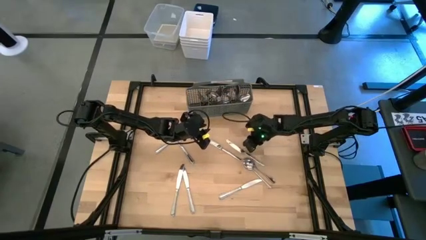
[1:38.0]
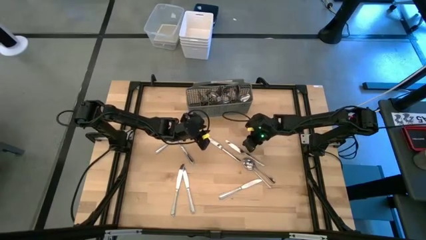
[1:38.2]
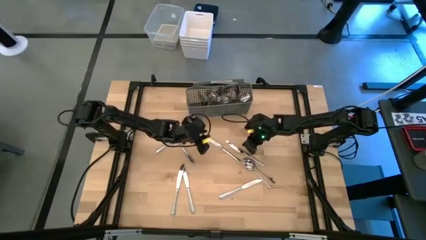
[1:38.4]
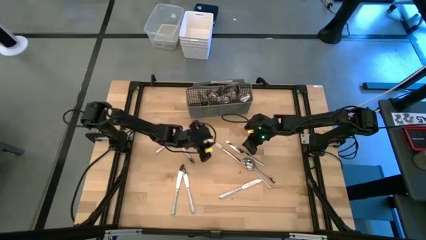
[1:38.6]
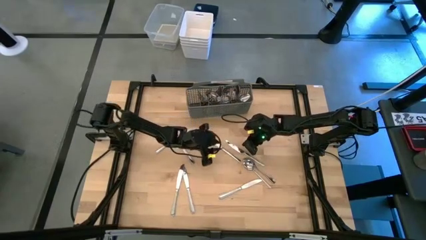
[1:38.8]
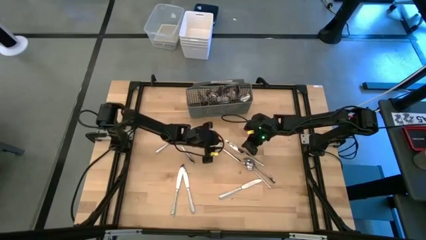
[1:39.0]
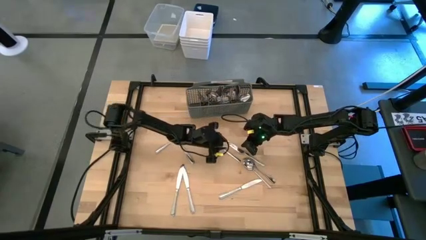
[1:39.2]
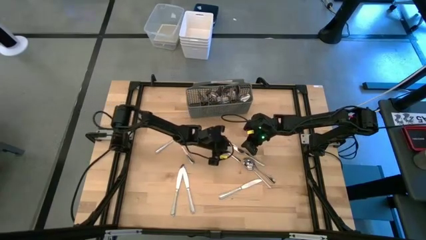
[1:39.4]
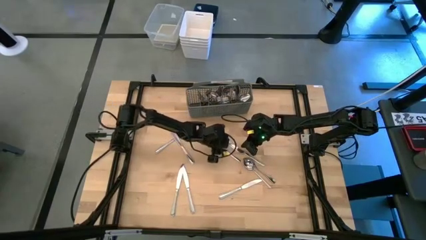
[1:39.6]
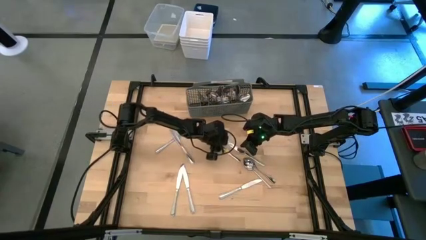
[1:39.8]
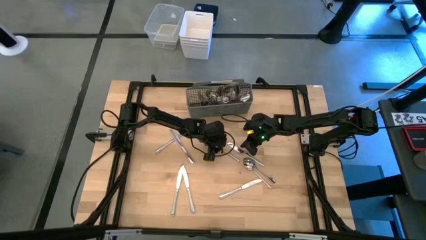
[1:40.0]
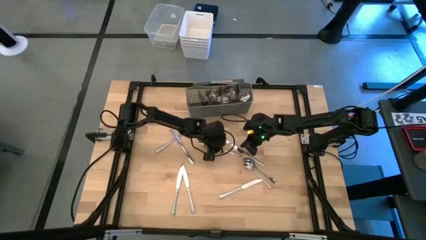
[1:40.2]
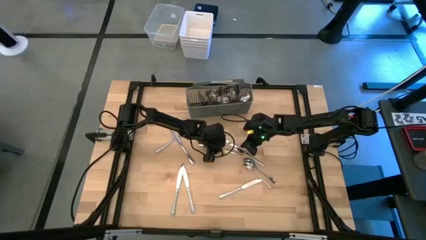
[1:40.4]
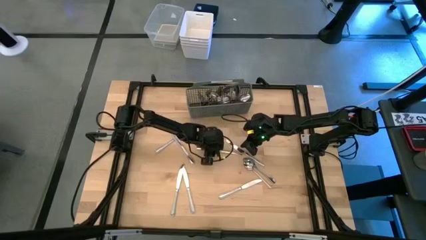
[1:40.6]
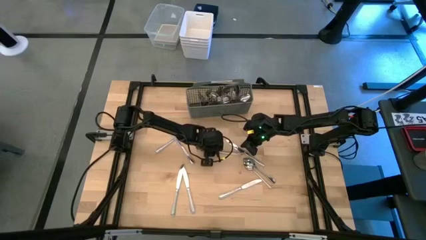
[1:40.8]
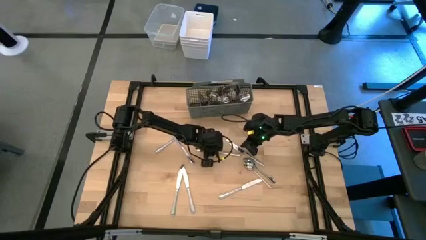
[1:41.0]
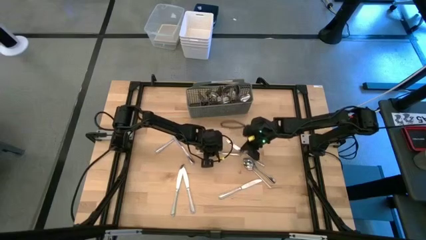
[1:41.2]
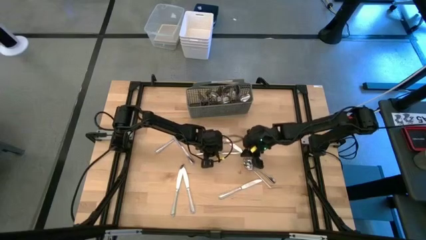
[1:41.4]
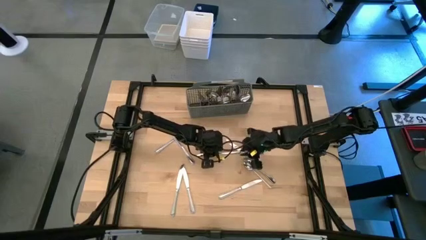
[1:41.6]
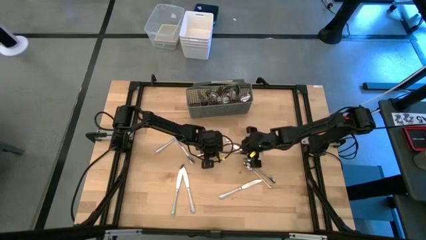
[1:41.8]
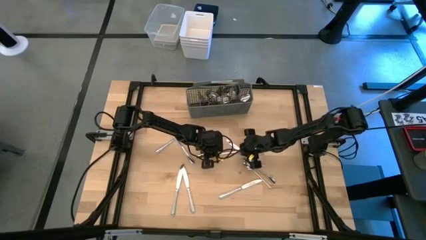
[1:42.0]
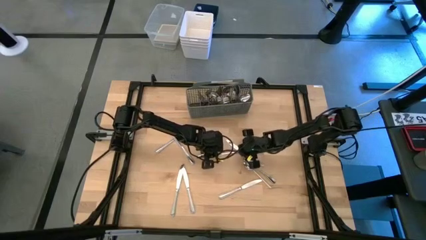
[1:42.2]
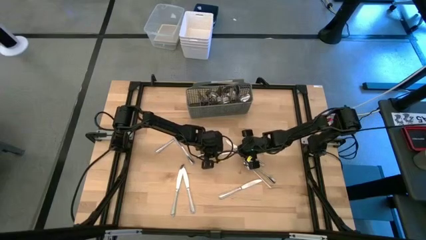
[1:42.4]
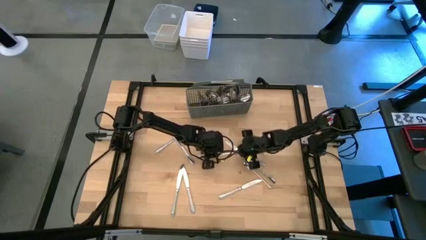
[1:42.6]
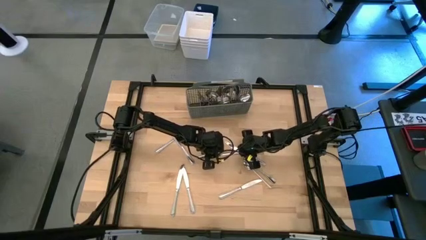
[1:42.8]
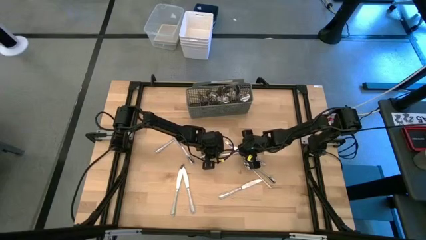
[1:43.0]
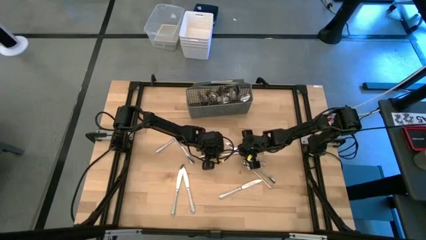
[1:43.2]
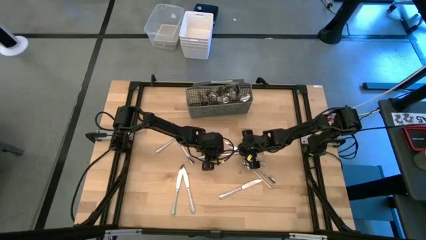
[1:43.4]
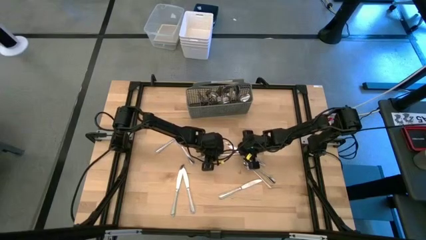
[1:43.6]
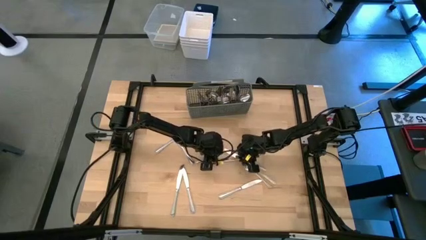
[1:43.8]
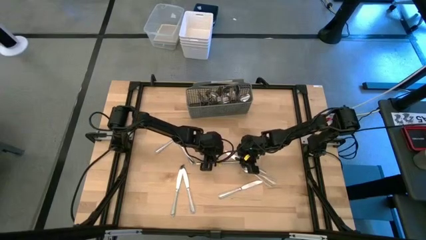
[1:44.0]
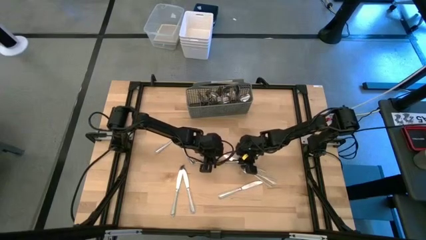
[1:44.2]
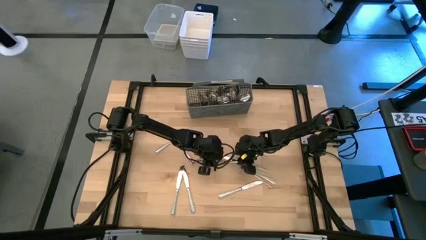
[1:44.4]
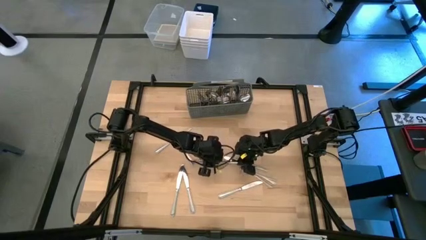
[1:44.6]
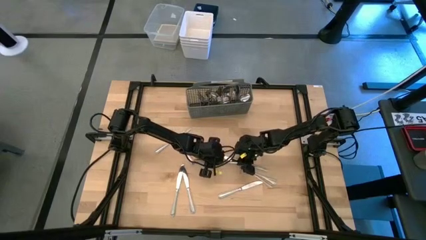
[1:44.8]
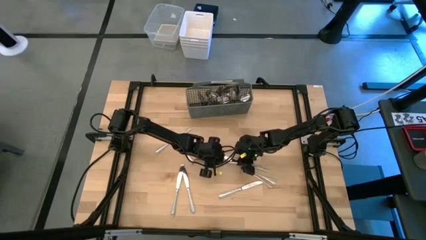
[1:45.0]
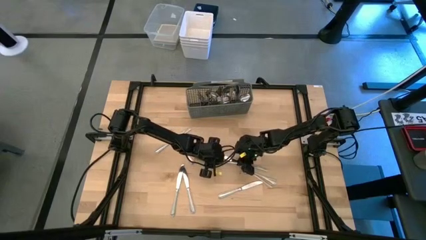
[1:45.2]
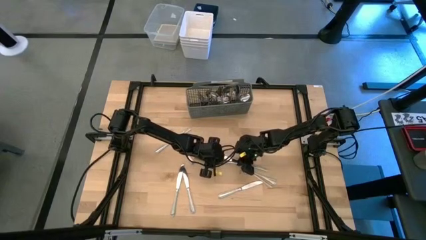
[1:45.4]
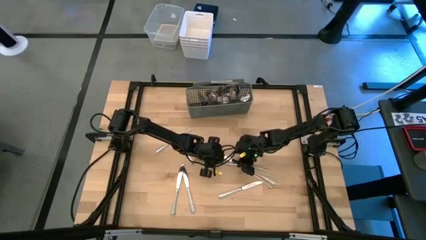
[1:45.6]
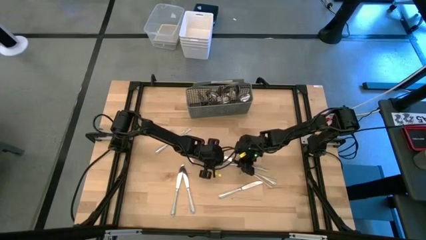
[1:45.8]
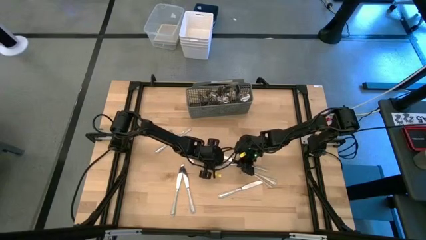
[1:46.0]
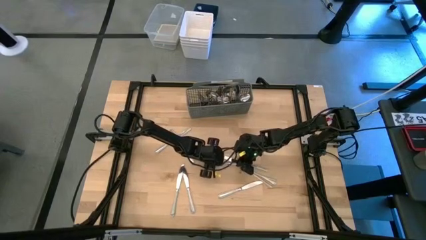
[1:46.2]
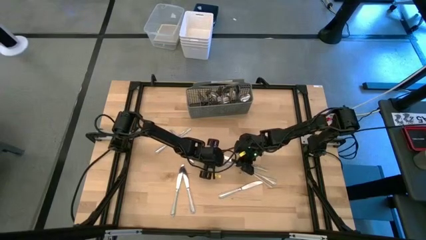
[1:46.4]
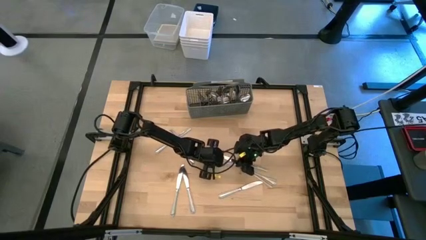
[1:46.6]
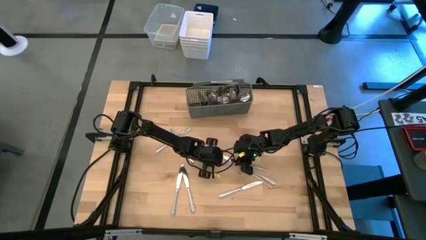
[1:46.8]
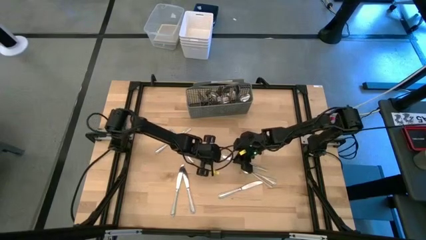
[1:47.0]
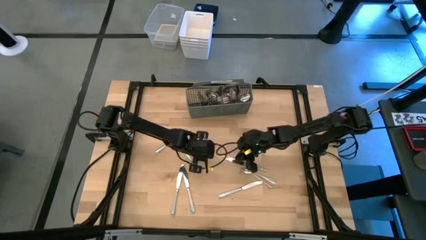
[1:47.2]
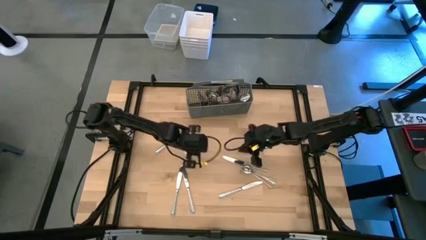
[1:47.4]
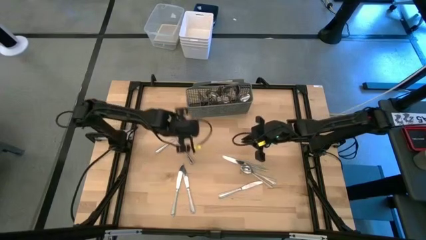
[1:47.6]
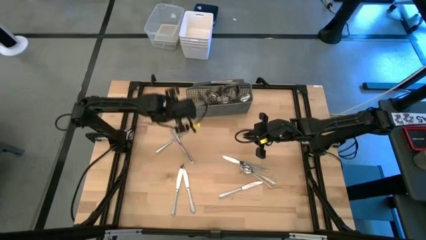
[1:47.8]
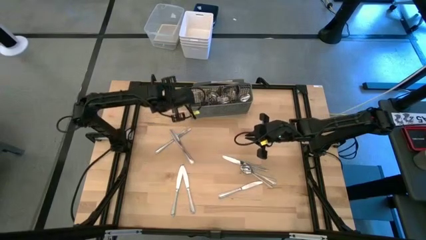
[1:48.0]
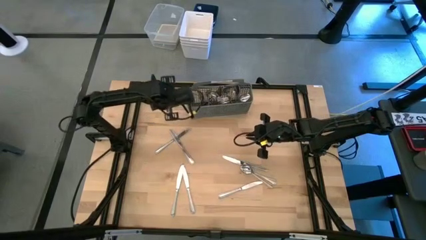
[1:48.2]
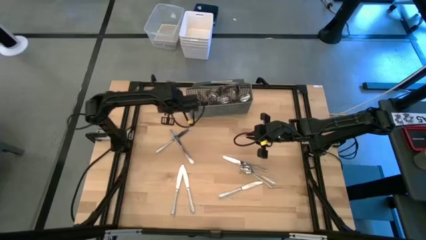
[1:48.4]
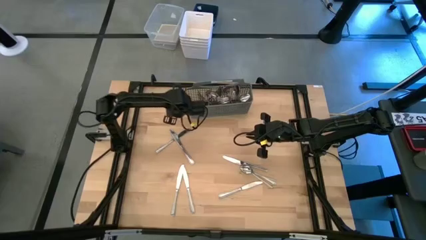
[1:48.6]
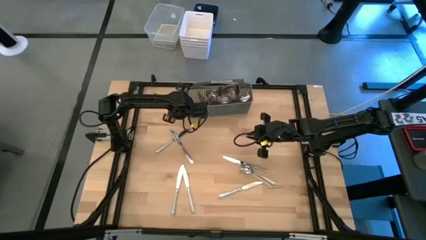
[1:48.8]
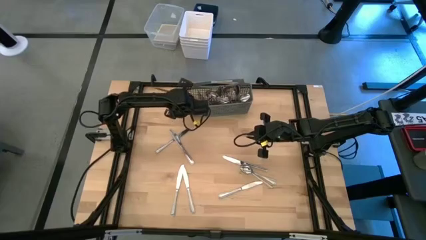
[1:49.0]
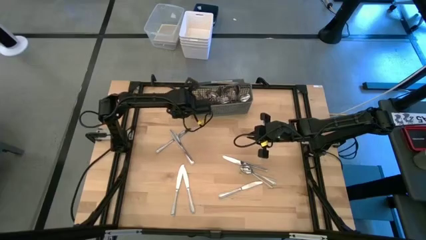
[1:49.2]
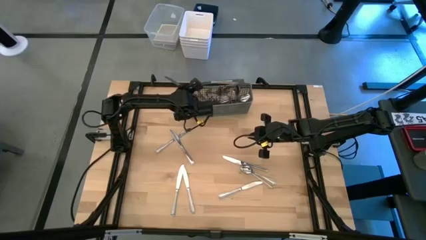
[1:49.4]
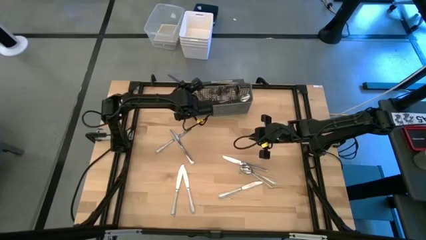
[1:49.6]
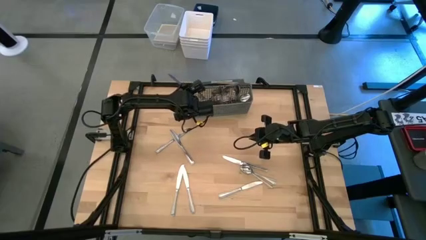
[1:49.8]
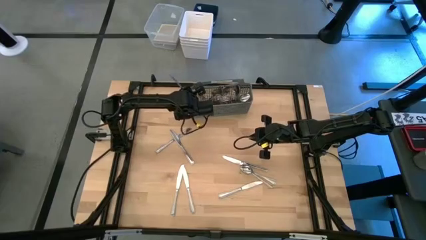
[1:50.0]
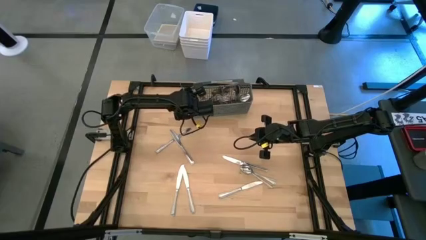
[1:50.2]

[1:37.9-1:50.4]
Task: Sort silverware
Put the silver table knife into the gray silverware organizer

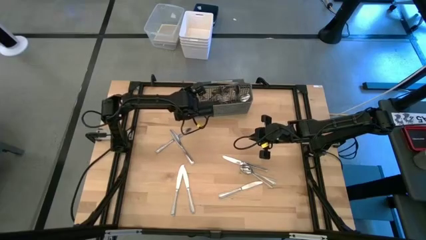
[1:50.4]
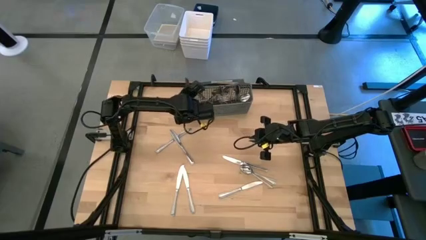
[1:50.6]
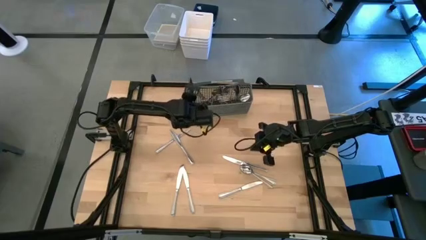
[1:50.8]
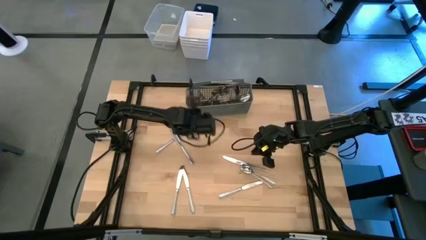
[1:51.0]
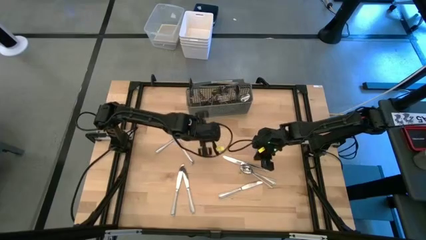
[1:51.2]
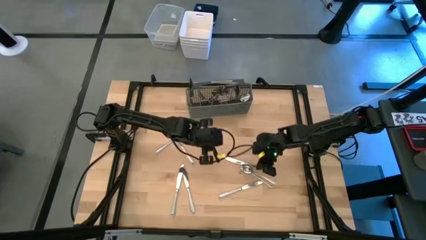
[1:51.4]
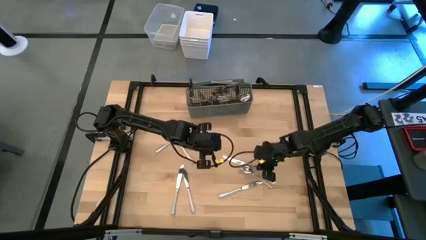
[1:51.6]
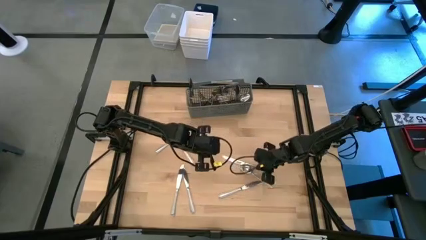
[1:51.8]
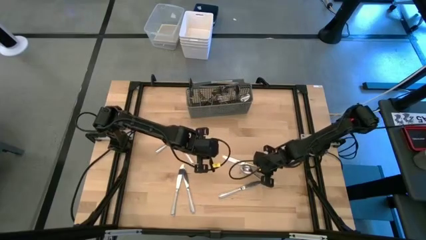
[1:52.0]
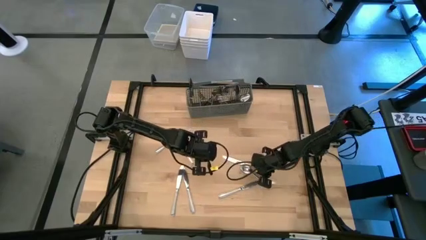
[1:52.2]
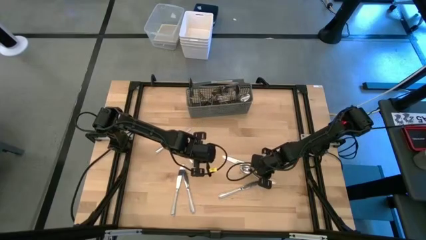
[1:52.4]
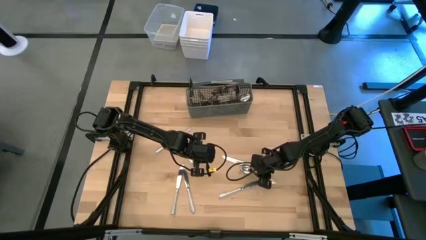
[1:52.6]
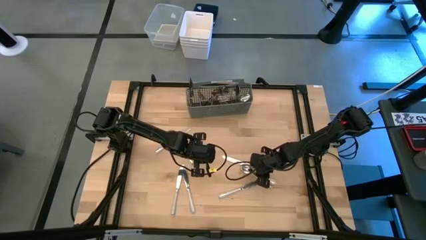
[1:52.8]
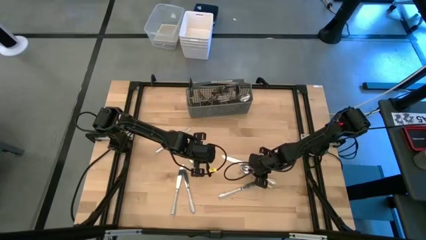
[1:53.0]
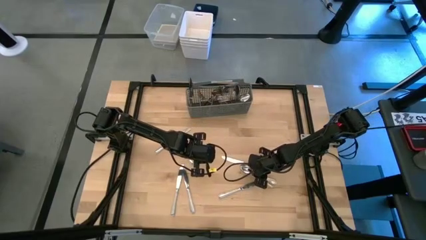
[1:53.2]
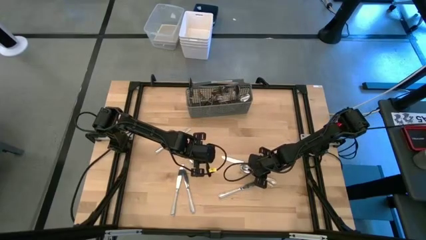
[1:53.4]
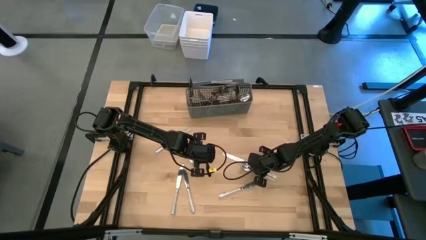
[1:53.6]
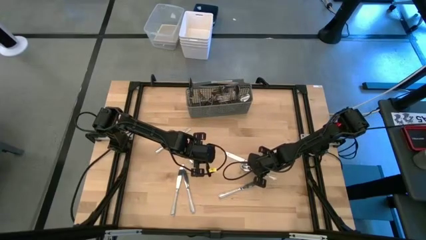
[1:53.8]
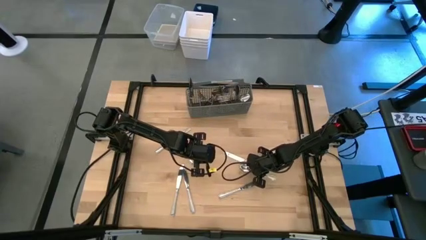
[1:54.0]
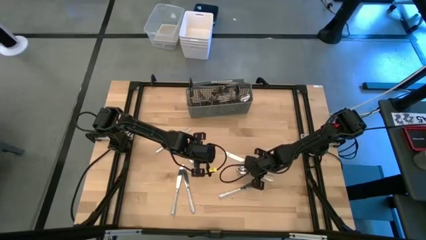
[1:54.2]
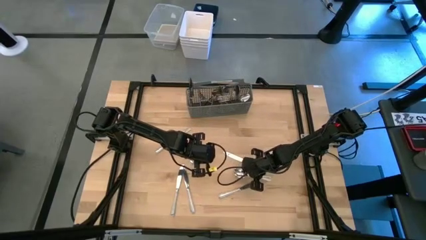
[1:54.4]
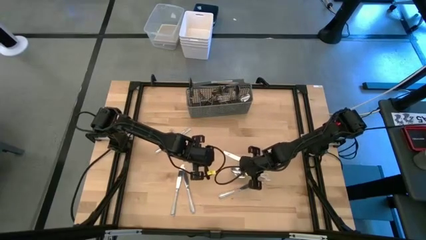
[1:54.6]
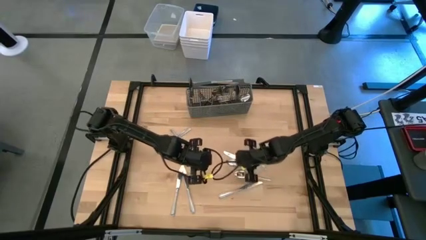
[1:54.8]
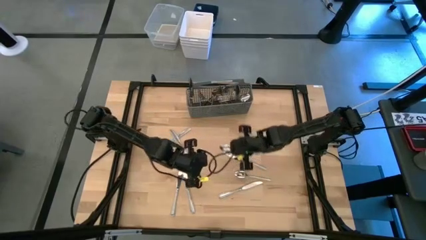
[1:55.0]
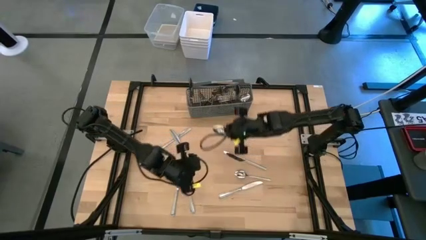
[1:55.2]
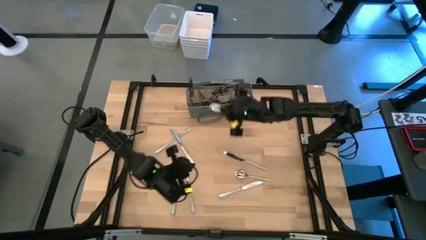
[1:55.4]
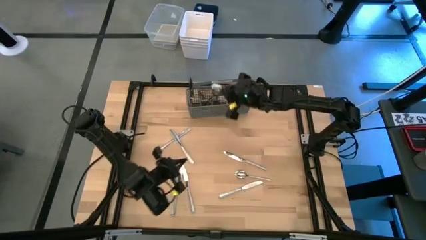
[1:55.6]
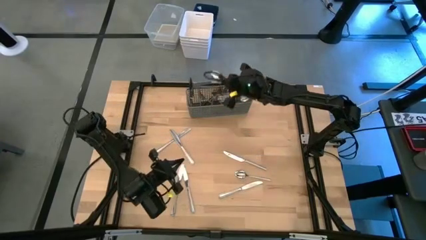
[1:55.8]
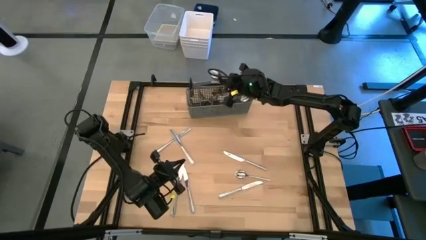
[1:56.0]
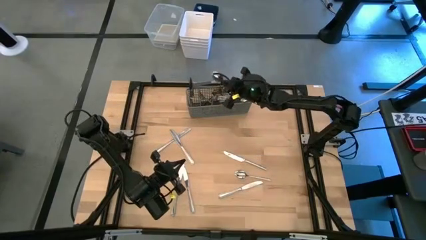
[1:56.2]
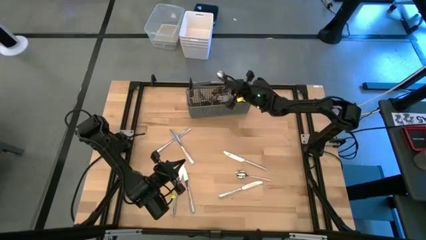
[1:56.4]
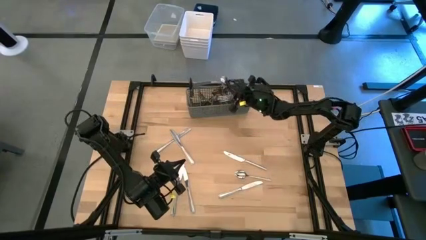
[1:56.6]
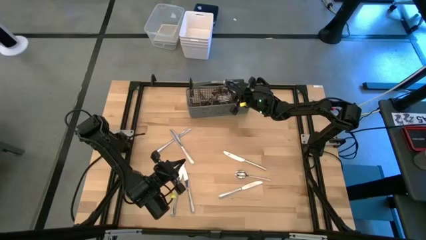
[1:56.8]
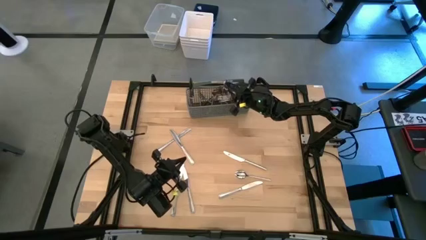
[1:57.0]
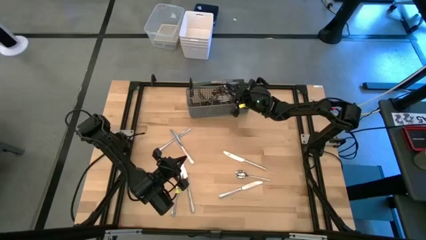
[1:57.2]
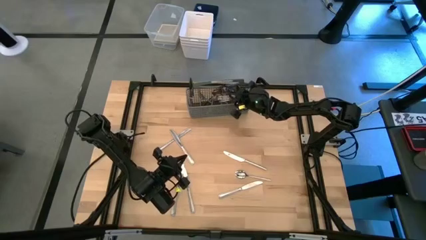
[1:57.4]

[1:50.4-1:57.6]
Put the silver spoon into the gray silverware organizer
